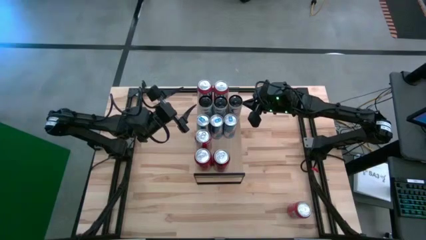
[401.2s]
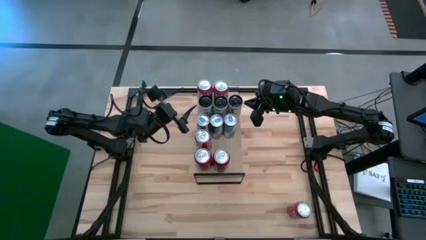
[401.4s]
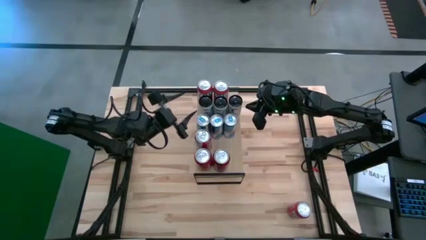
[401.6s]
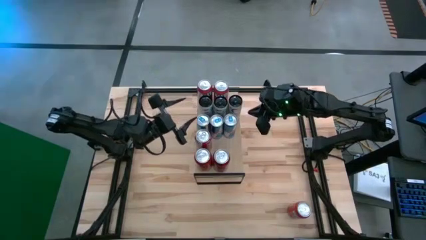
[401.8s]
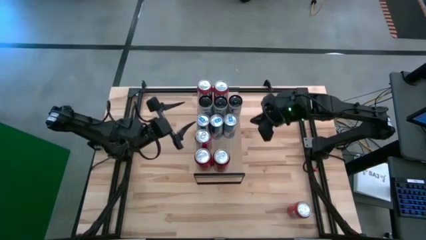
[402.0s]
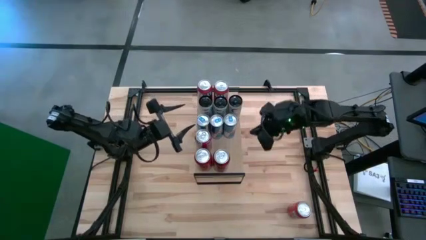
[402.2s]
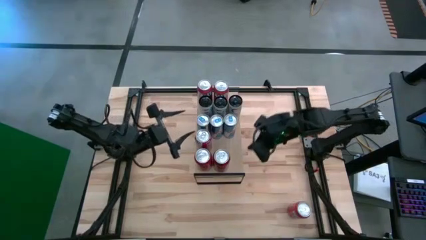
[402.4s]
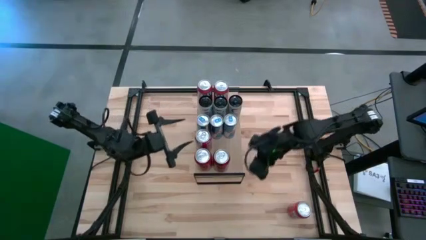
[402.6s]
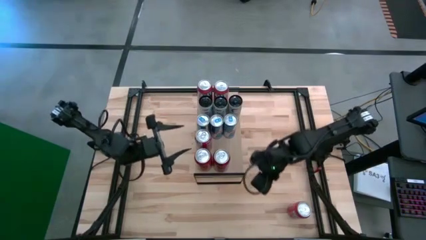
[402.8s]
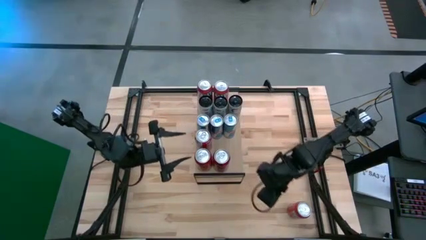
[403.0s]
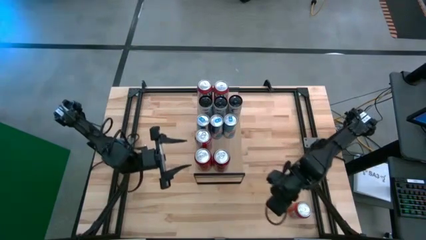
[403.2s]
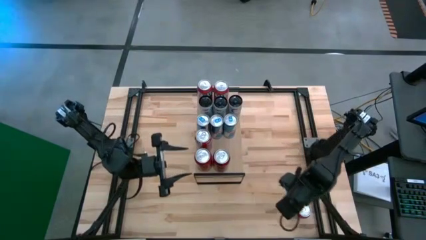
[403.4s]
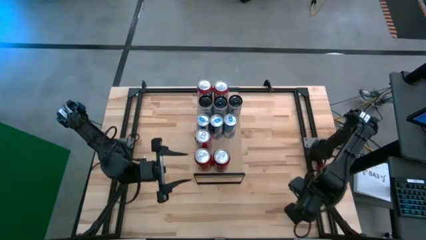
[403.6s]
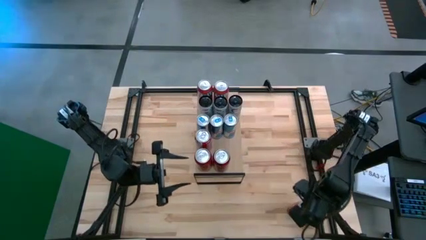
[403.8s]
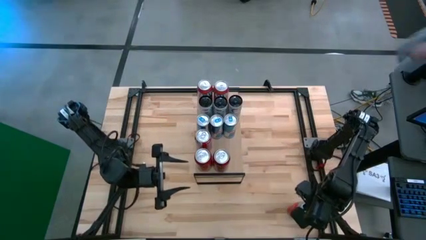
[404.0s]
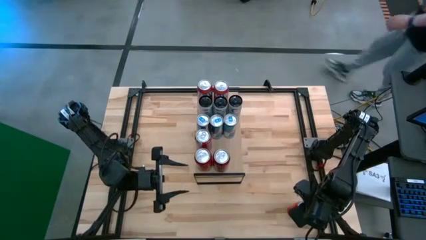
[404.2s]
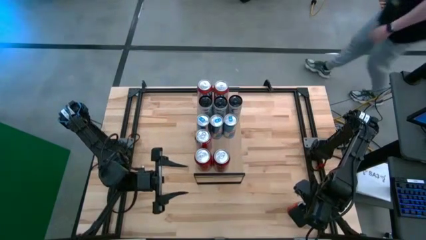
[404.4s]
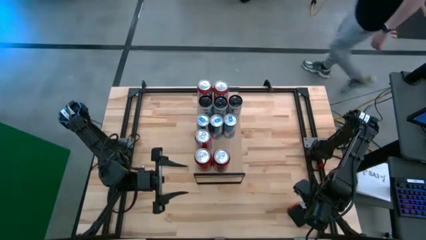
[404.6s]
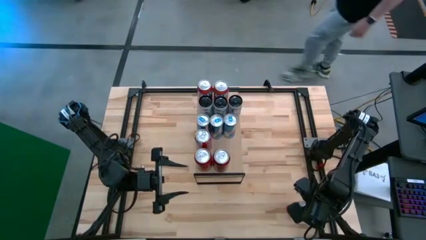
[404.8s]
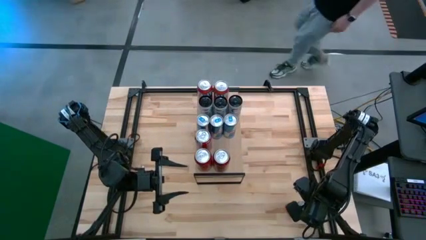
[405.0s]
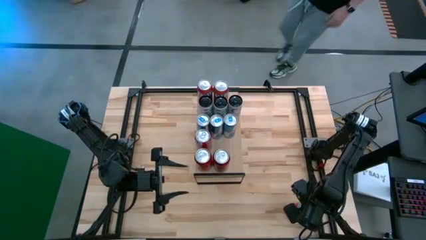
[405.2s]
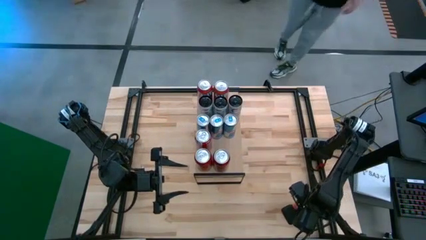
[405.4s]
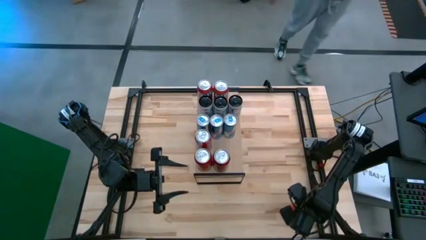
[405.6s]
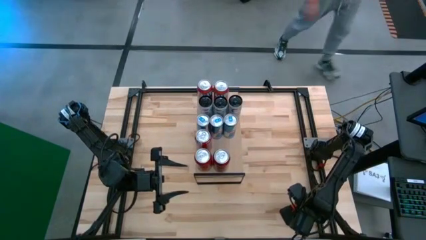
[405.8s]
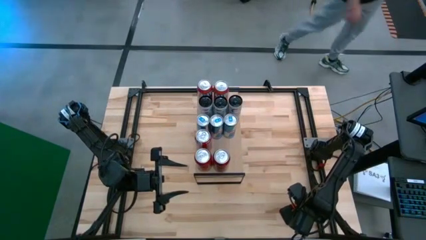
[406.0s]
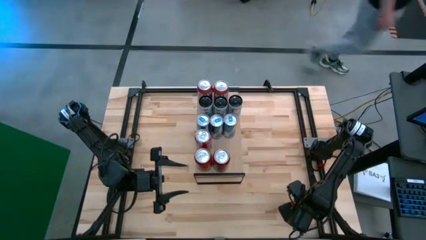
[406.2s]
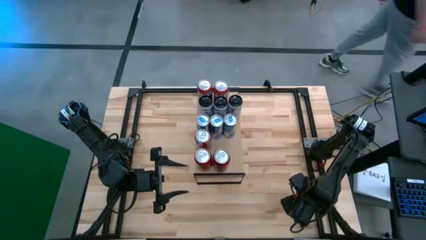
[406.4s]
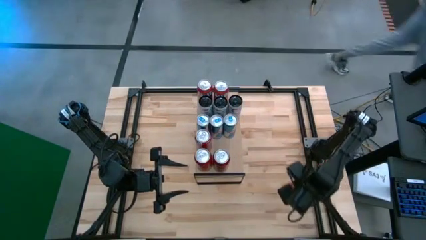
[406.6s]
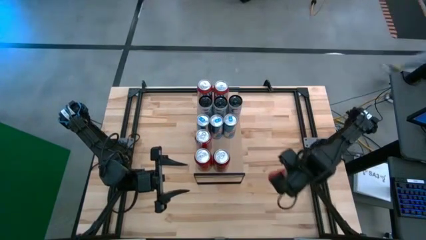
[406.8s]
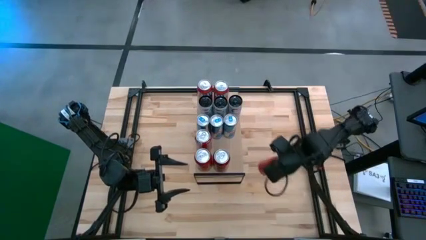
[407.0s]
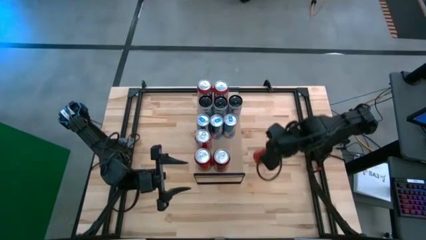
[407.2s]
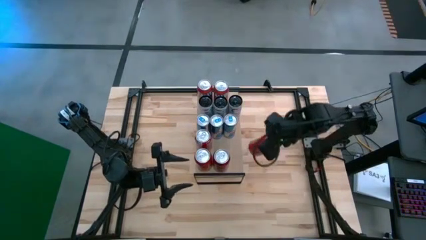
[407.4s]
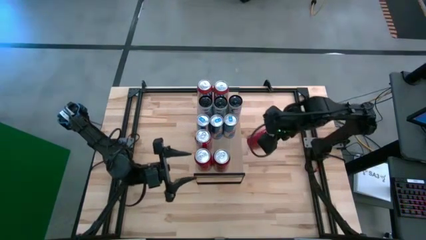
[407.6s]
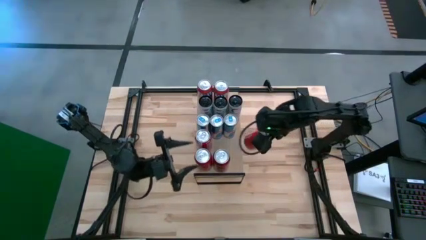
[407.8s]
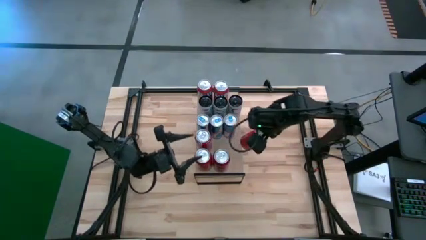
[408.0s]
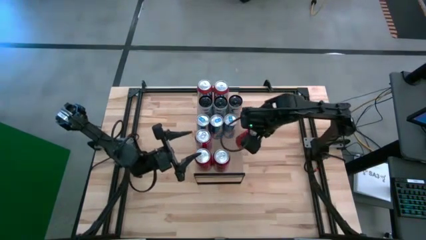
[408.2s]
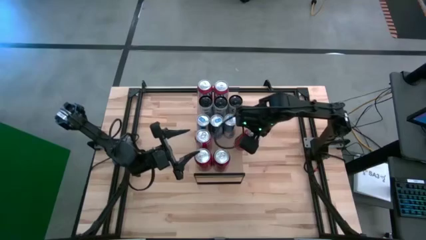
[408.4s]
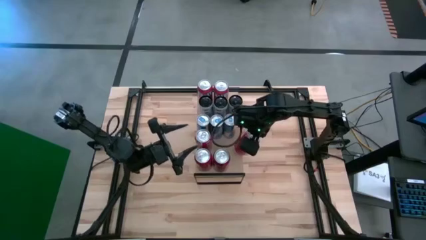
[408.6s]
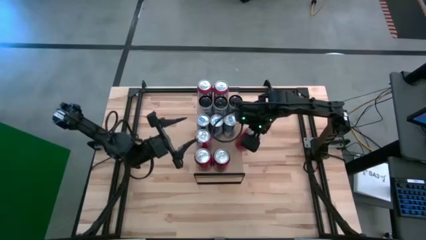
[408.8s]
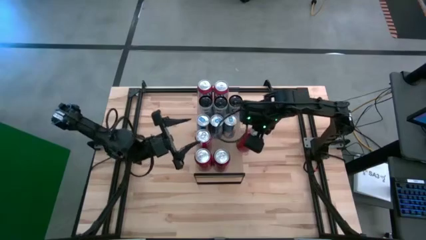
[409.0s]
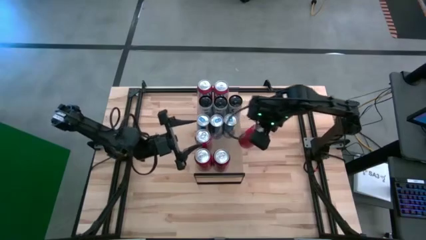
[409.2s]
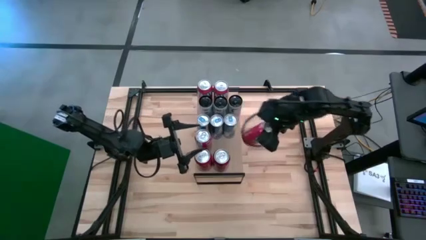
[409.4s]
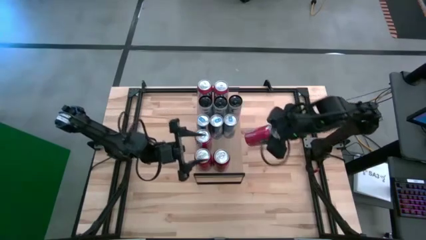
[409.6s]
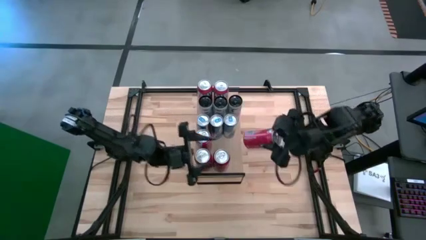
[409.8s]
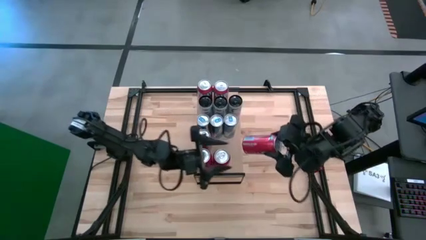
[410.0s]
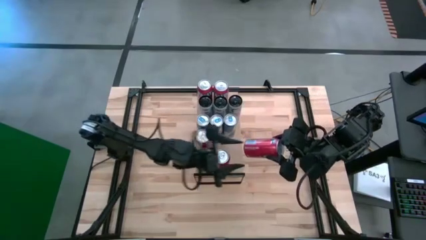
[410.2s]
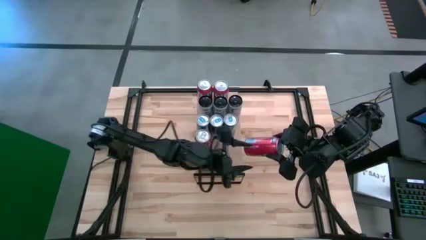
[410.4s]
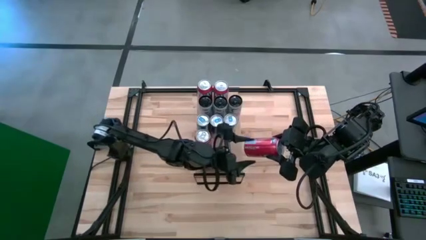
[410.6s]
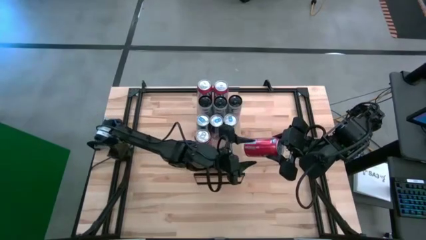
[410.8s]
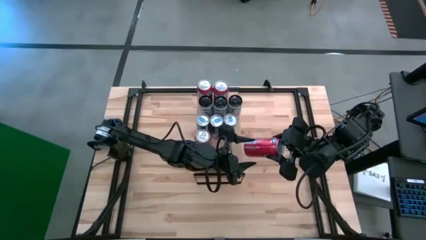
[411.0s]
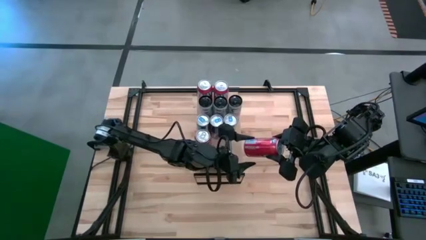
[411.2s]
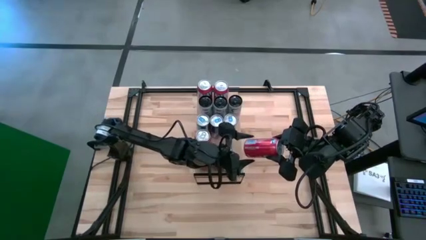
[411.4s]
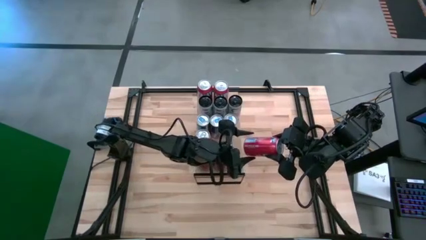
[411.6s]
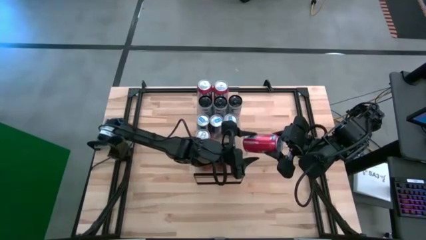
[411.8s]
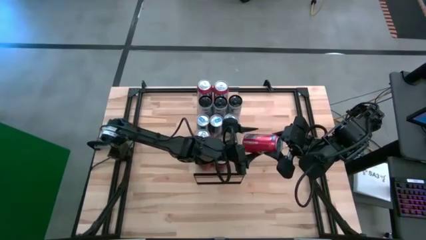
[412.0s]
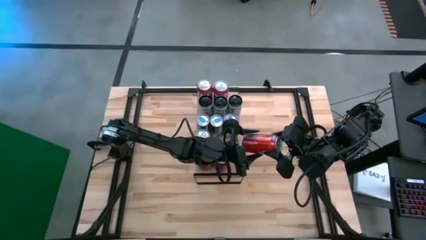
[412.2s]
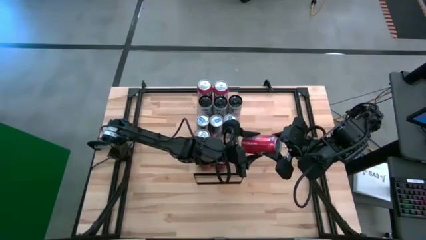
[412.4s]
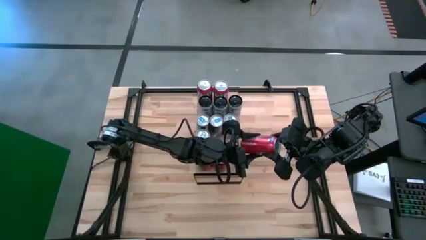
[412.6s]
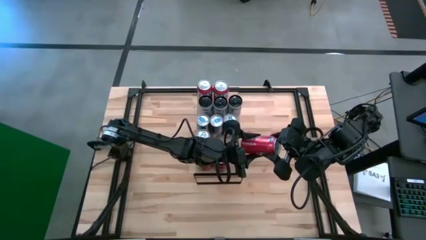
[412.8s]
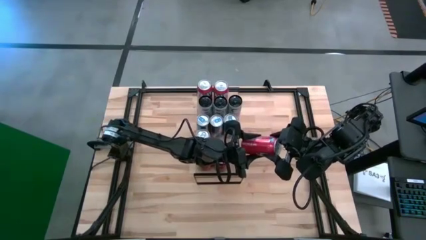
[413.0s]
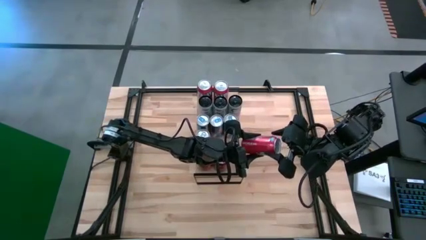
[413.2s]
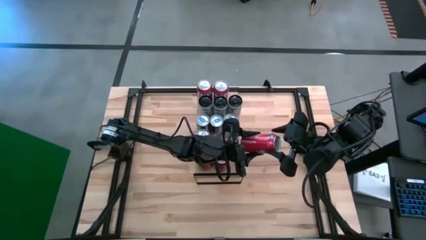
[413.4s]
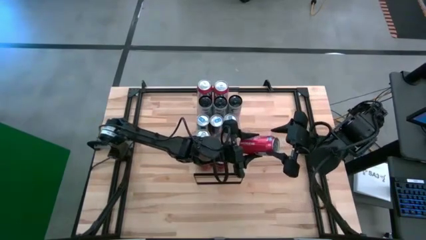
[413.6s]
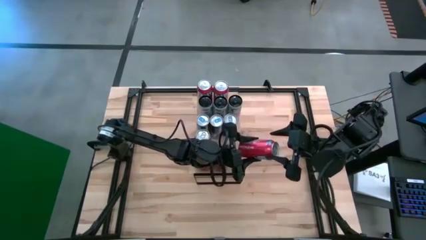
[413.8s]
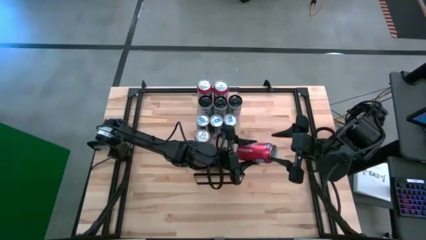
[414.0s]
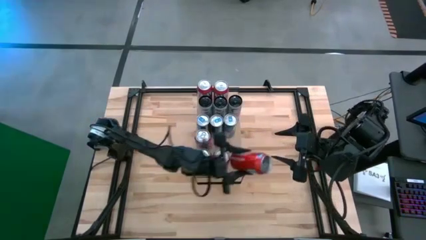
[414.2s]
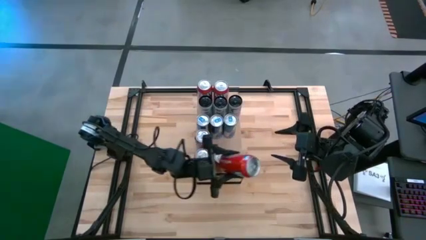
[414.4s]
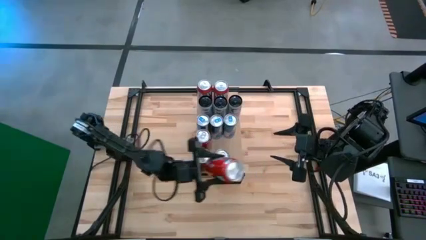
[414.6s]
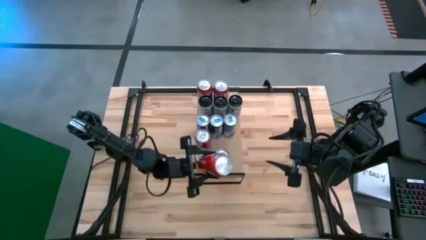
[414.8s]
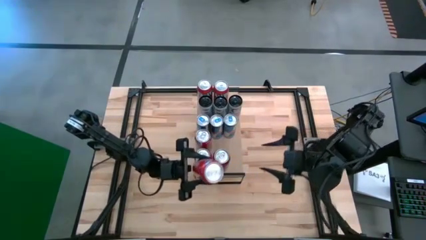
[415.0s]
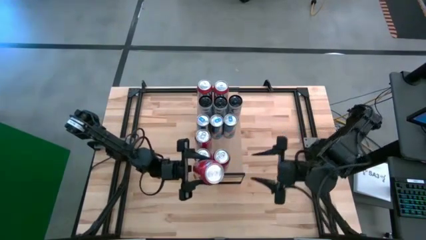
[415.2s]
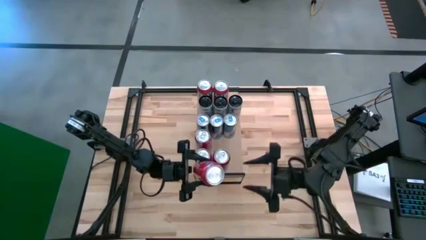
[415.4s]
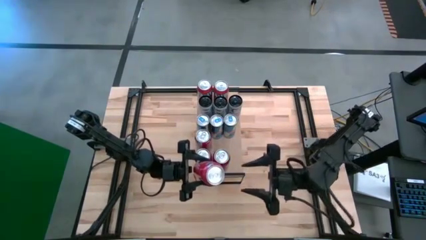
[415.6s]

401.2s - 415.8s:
Task: Place canned beverage on shelf
Put the orange soda can on the shelf aligned with the other orange soda cans
